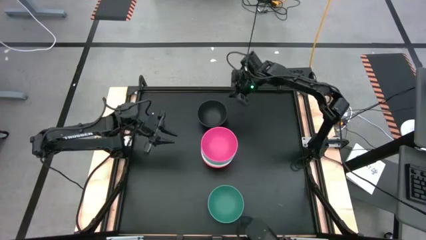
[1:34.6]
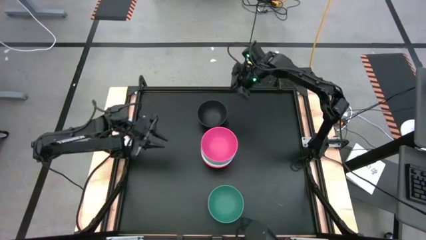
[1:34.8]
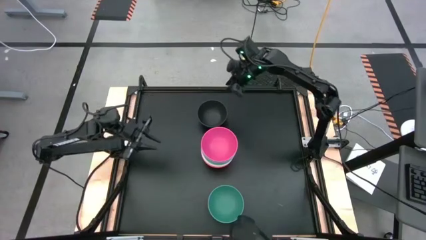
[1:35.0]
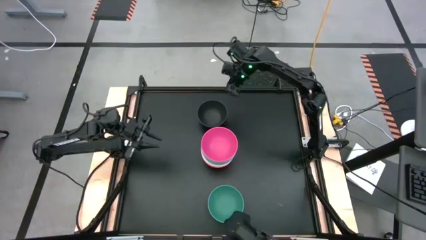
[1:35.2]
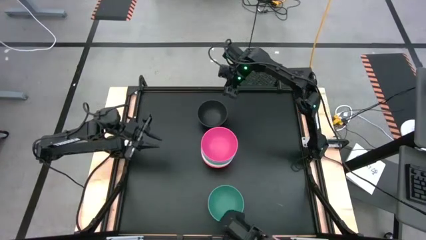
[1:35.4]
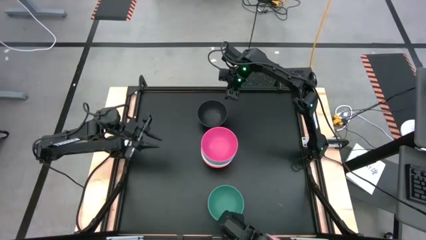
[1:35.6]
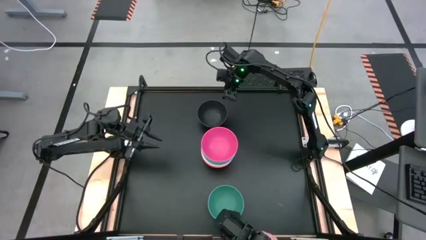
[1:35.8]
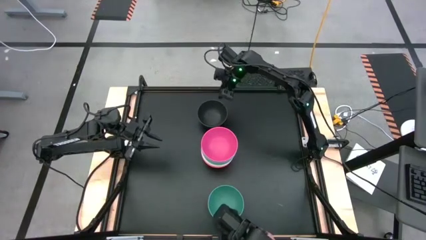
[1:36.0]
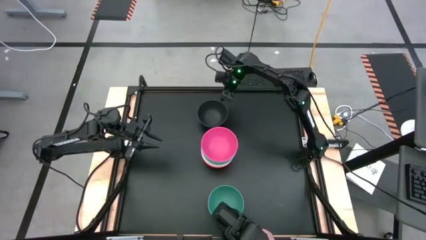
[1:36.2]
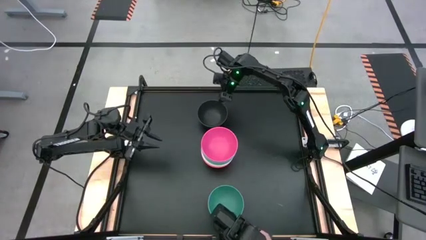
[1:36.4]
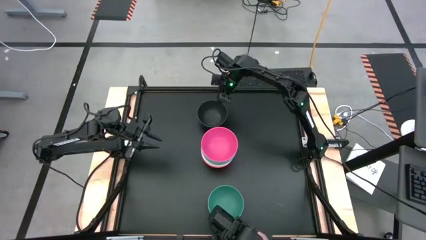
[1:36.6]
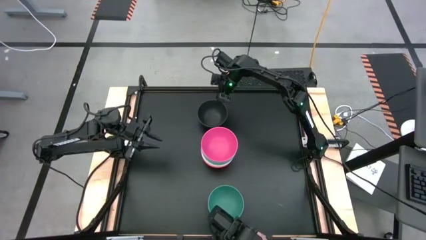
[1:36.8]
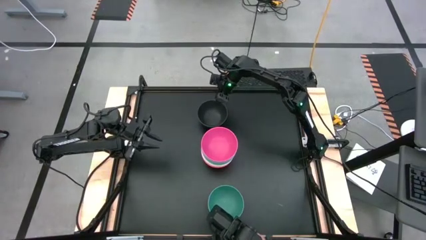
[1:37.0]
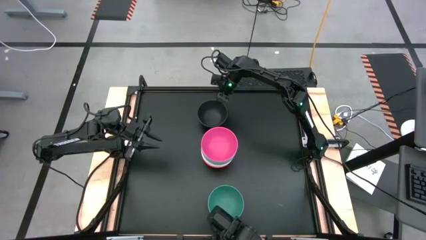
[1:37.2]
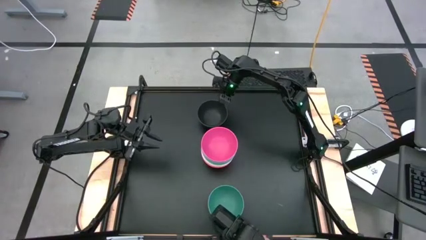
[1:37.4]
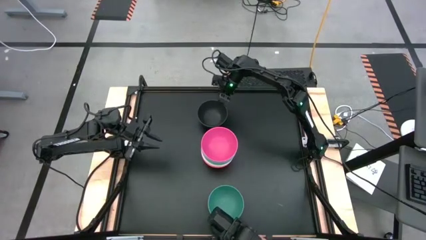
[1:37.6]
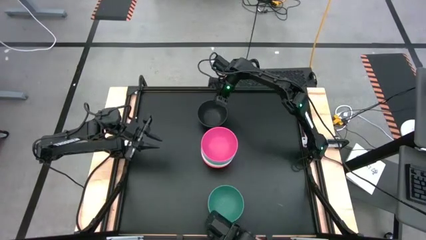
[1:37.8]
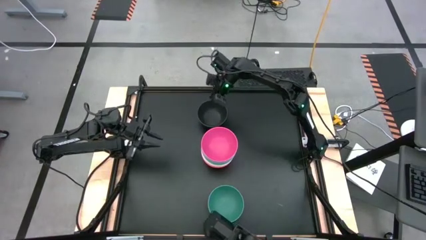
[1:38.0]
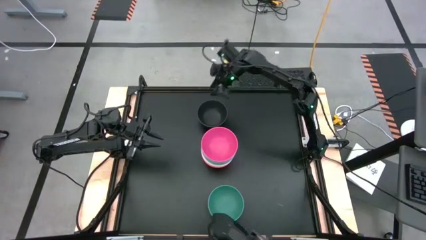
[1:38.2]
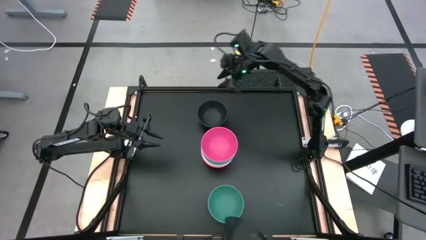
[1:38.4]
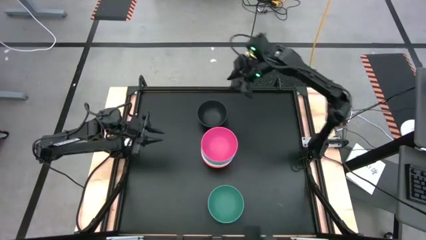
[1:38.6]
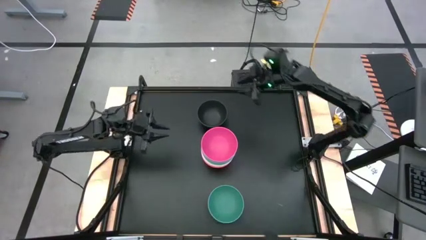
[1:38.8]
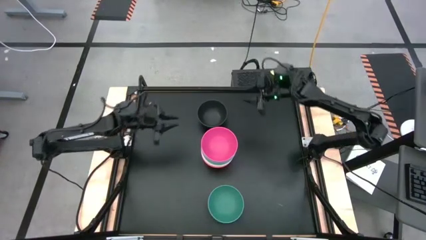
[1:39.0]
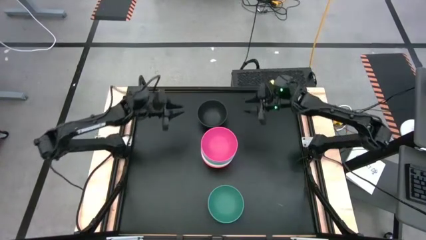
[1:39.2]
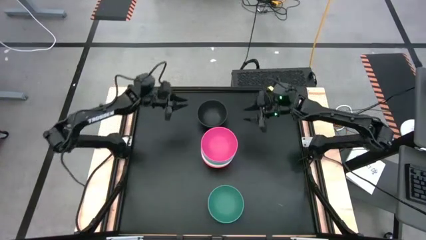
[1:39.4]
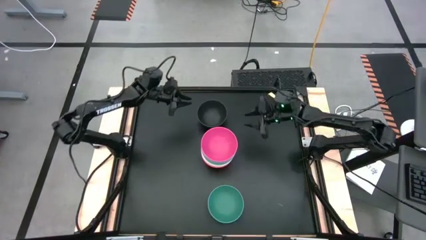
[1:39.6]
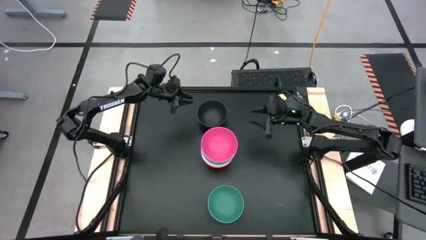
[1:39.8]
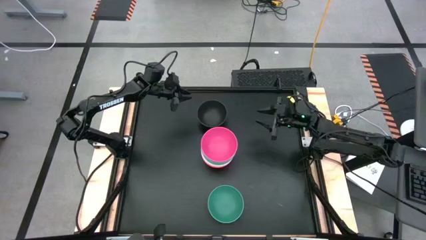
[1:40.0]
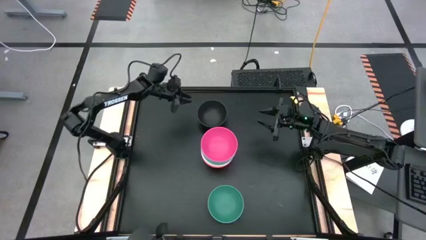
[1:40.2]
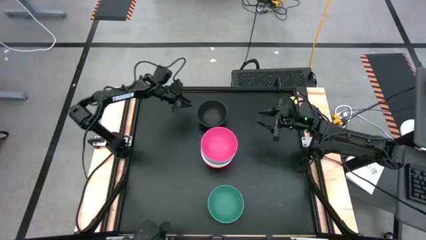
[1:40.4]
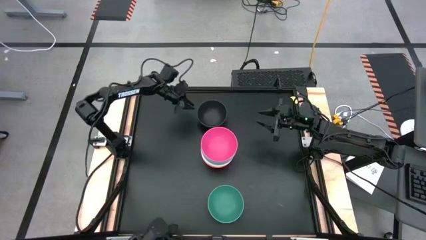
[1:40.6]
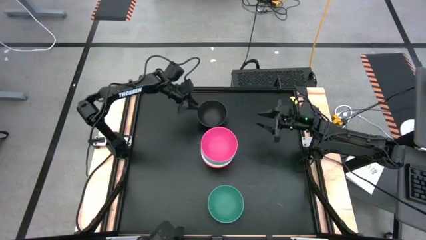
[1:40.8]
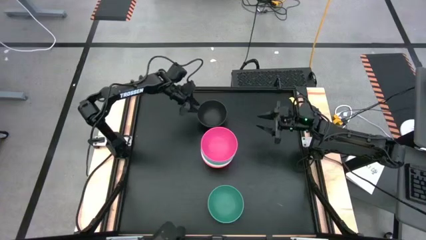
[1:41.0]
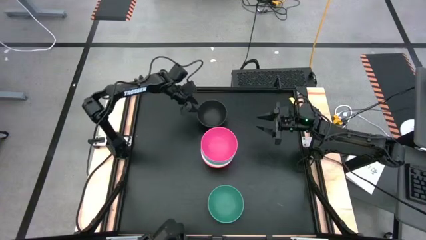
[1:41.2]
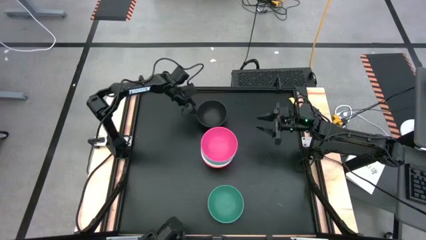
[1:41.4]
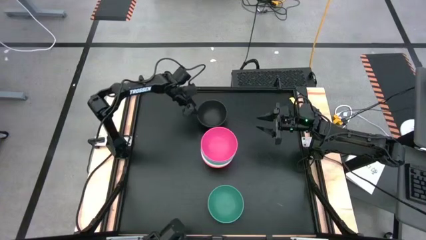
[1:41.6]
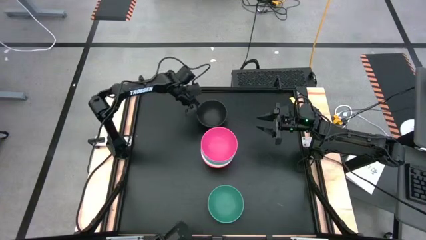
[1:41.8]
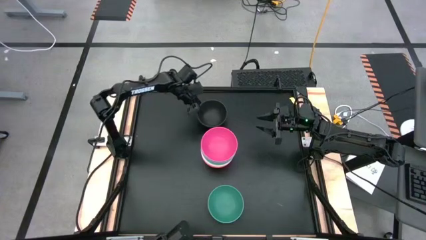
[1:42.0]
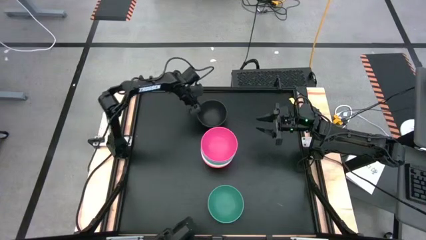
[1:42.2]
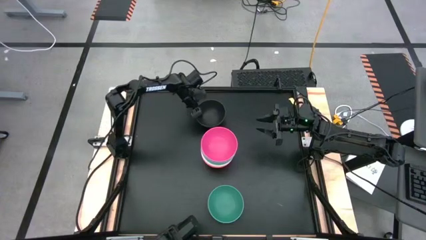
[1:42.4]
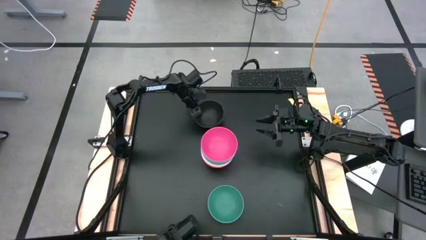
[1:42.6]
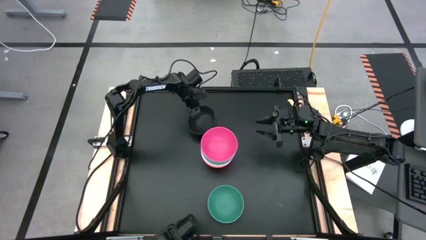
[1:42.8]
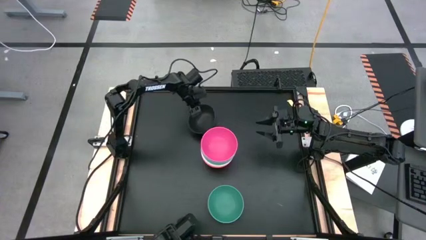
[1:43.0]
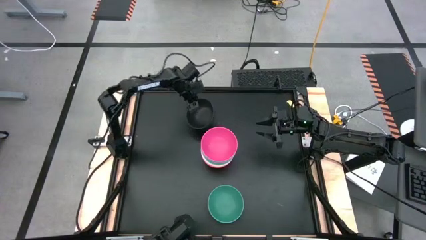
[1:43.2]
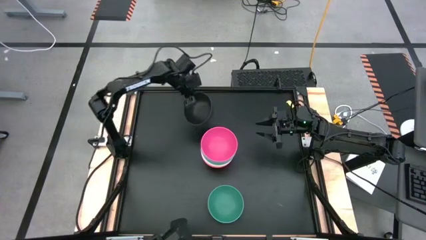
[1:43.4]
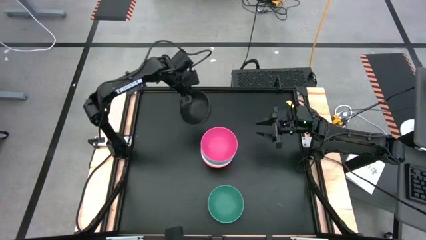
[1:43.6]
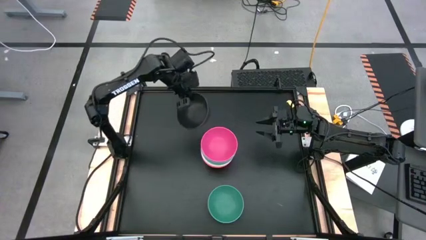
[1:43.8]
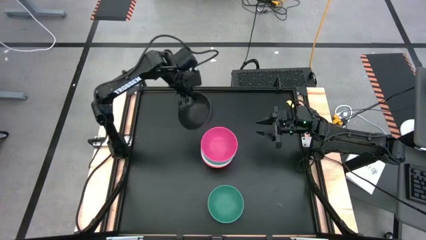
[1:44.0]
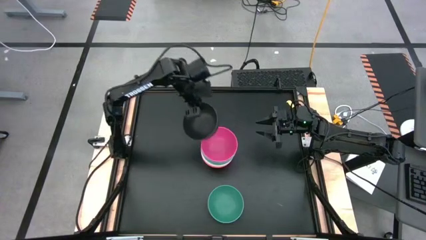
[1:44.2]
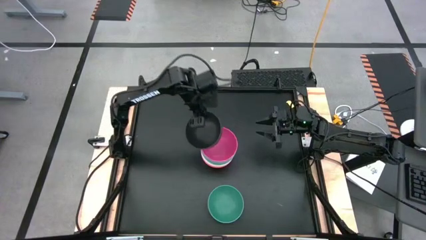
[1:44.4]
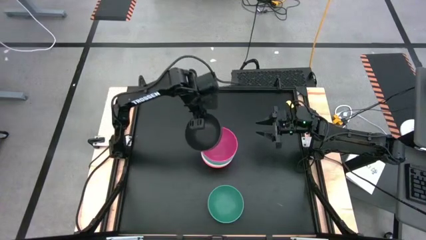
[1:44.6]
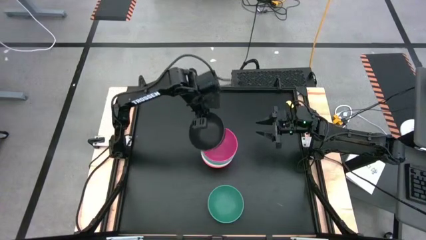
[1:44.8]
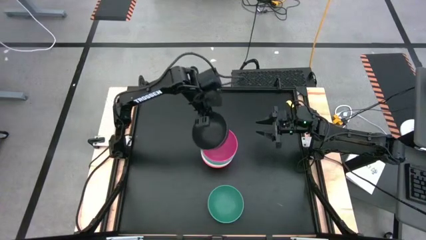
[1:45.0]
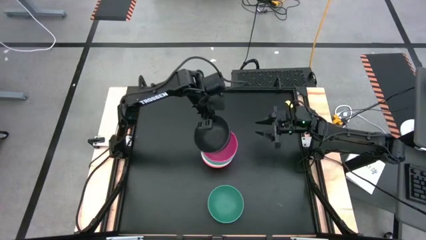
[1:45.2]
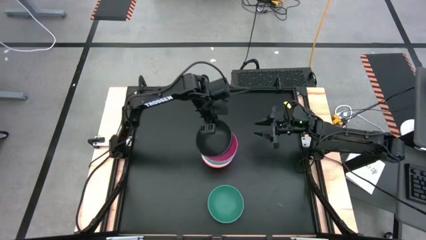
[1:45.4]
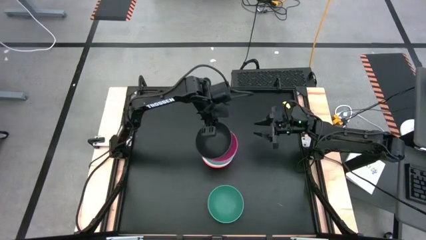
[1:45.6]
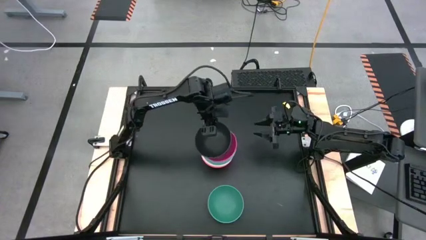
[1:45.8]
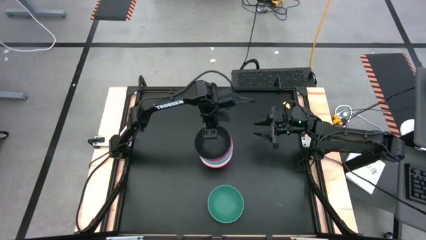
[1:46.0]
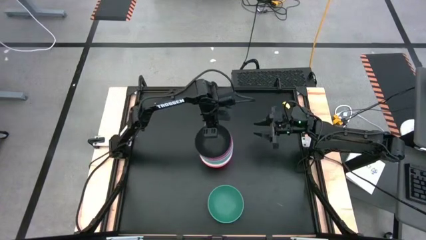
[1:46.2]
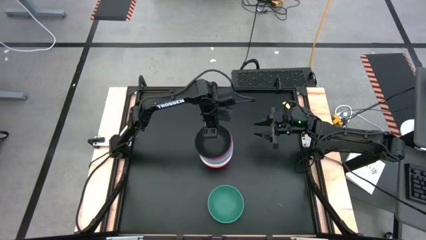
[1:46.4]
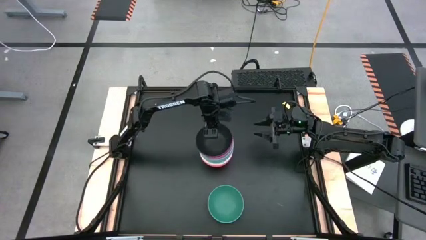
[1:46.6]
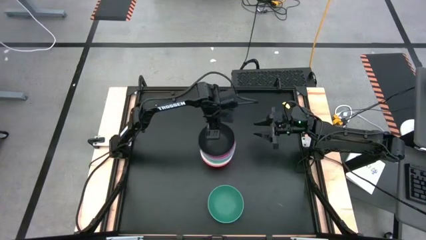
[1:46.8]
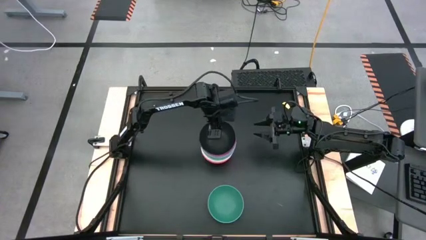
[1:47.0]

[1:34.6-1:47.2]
Task: Nest bowls inside each other
Stack the black bowl on the pink bowl

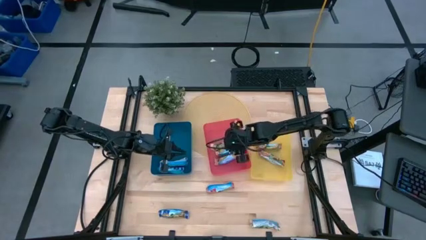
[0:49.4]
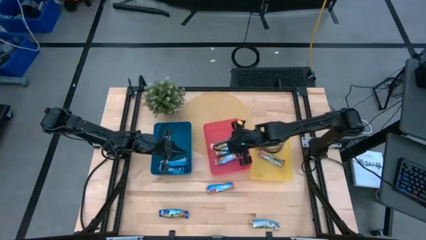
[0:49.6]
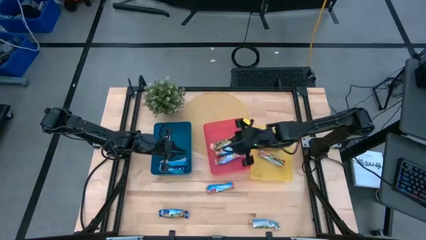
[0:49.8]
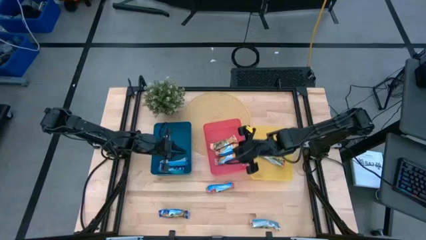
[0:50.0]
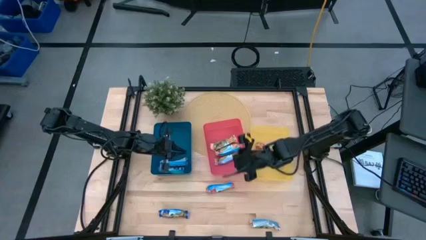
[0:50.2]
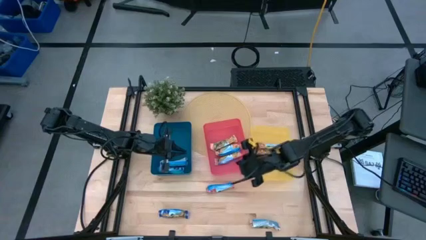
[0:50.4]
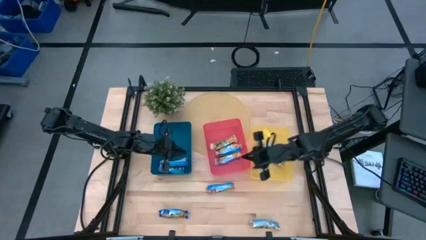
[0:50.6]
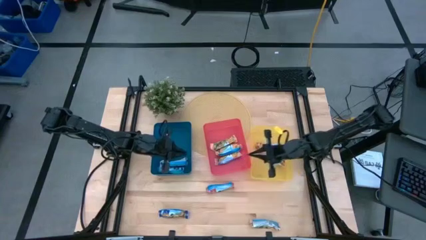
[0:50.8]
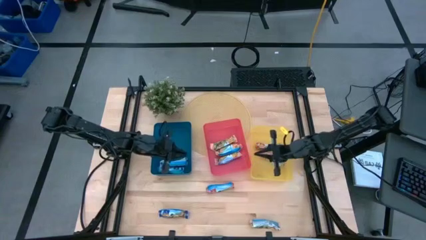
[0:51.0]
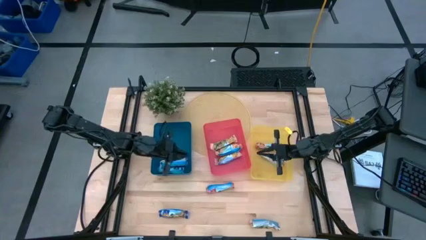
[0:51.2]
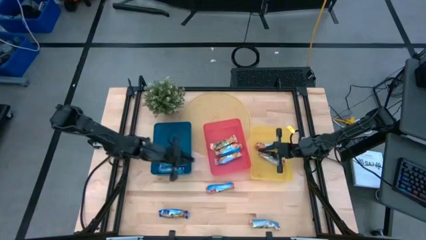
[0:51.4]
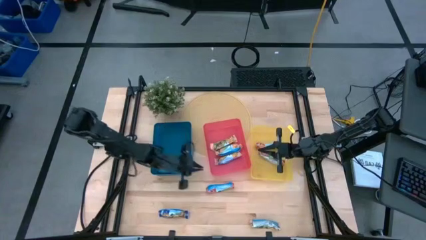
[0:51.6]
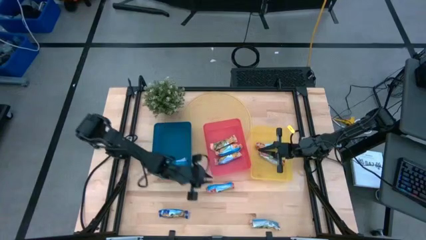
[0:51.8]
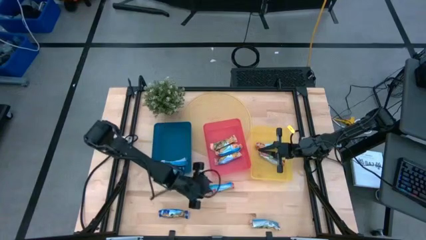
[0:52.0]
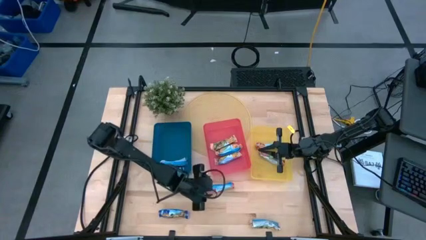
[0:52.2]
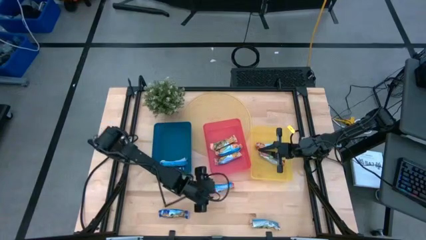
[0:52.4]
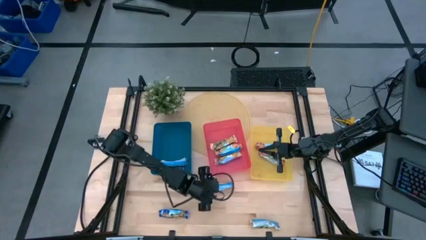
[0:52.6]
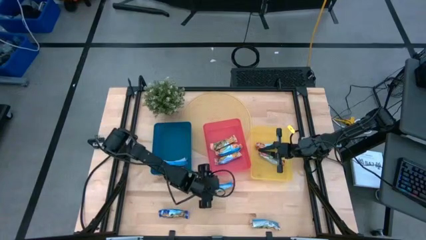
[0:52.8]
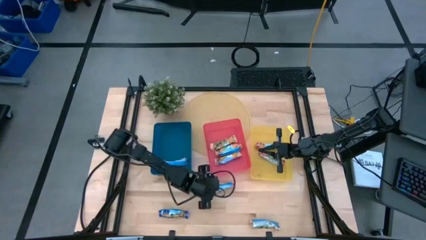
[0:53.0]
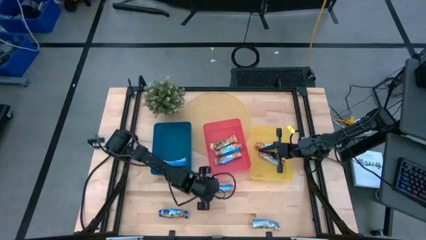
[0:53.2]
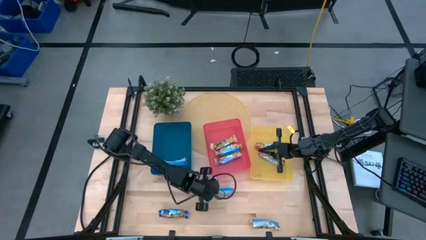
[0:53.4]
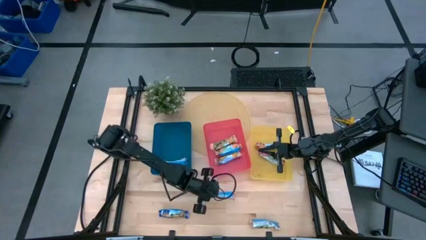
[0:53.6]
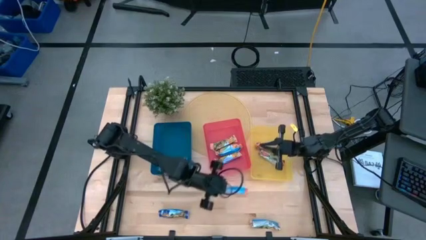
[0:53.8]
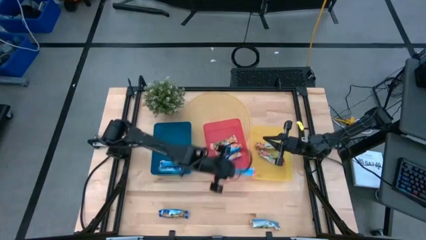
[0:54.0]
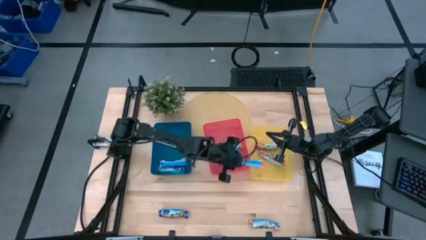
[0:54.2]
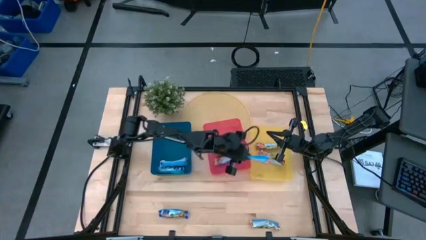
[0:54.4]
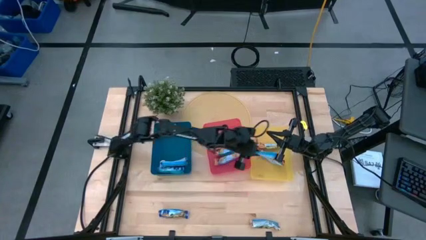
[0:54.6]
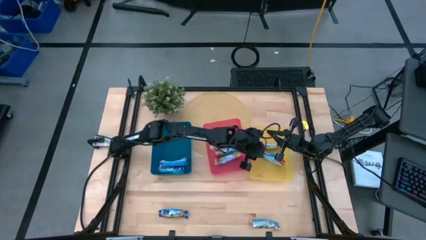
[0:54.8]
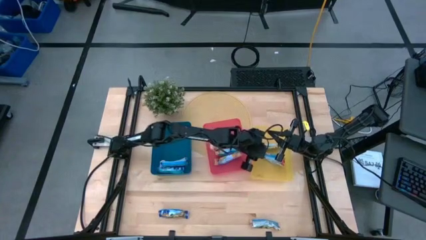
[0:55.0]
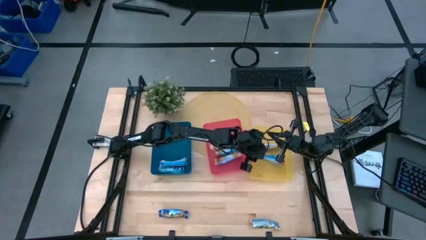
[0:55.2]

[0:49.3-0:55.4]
Task: Pick and place Granola Bars by type
Put the red granola bar into the yellow bin
